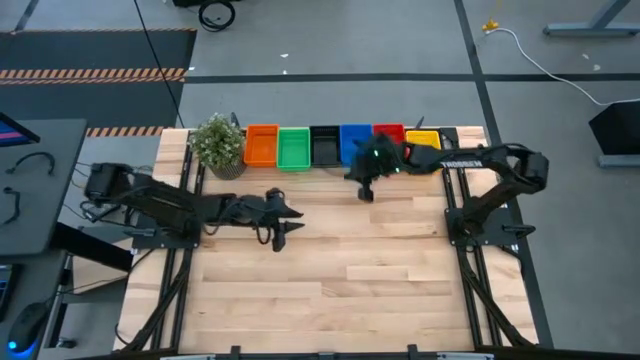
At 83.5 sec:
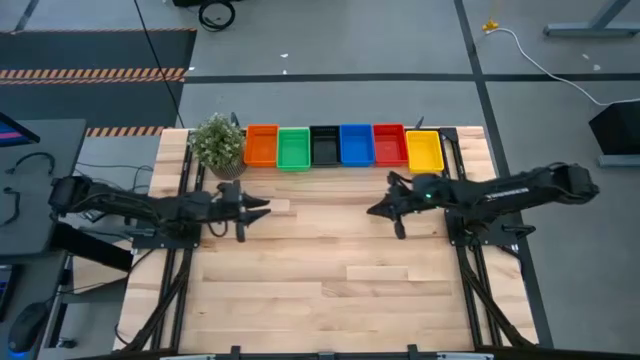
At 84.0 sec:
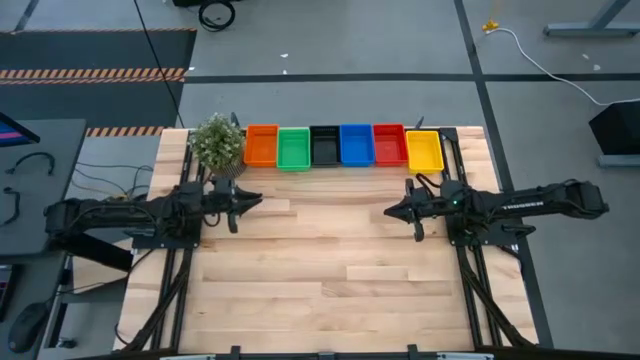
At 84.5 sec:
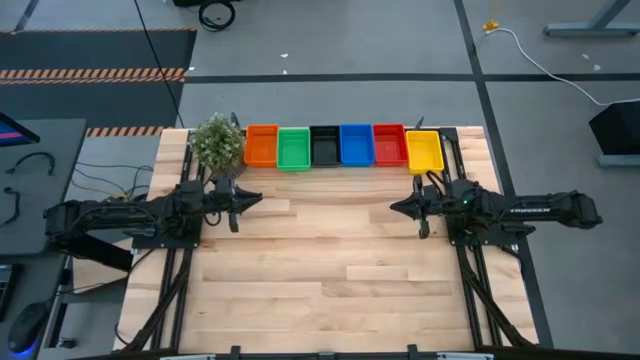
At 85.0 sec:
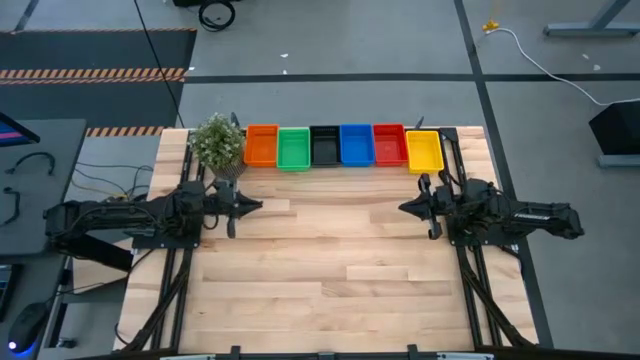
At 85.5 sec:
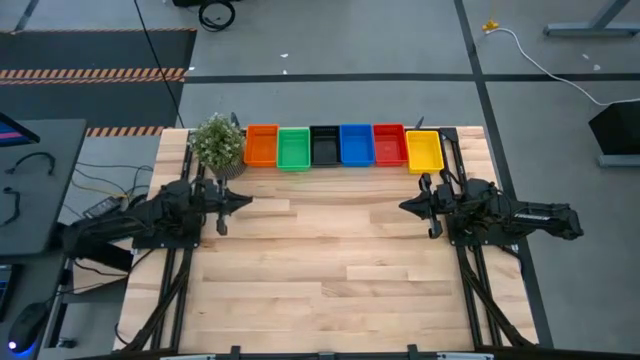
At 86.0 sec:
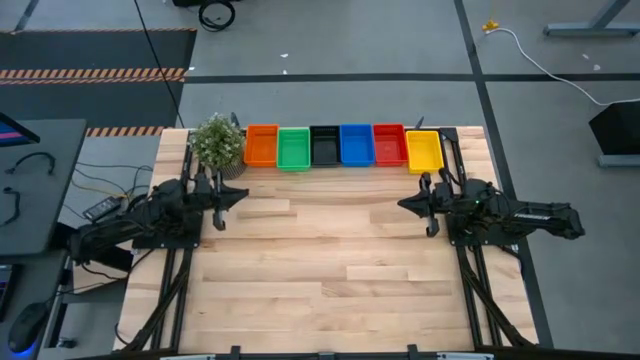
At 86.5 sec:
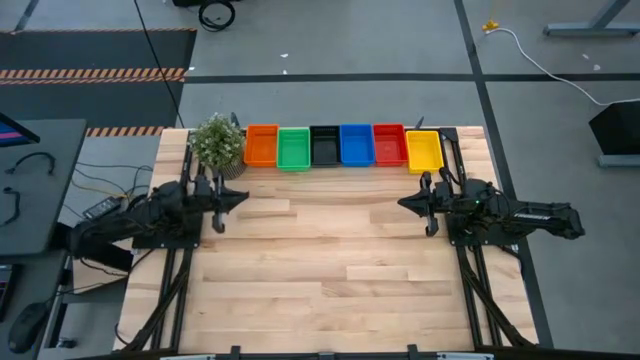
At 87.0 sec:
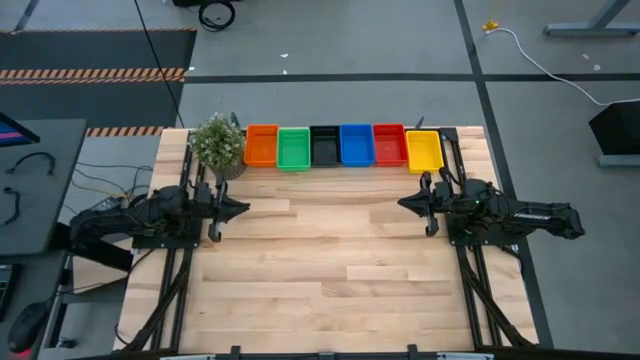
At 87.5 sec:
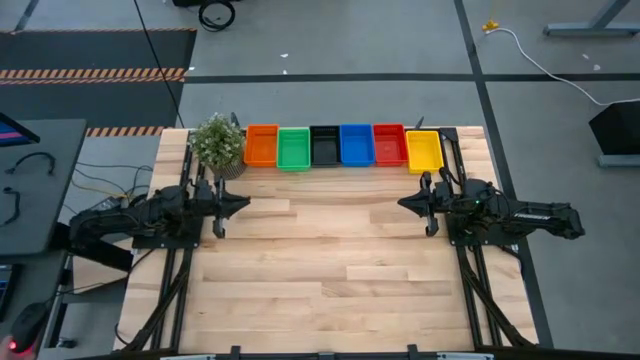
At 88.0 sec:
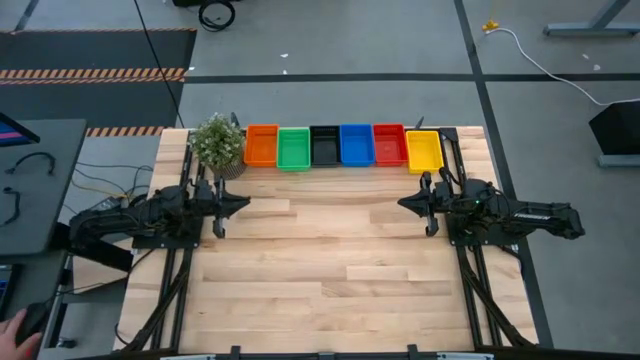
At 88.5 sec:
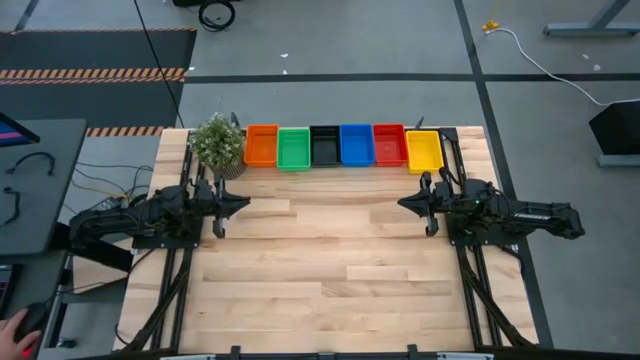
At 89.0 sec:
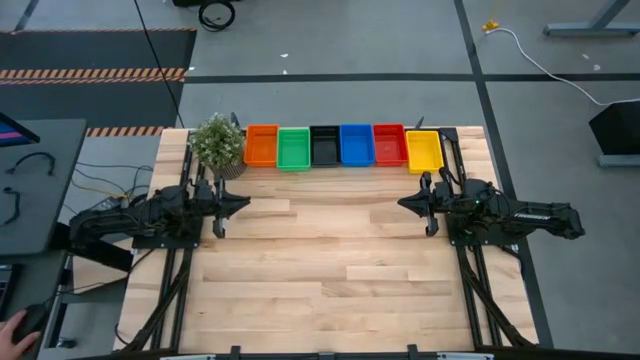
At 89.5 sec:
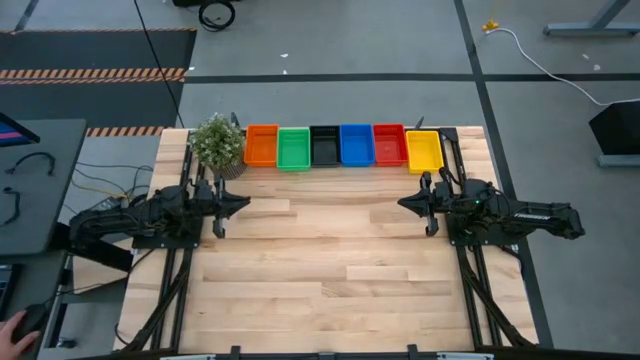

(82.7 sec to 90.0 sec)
Return to Home Position

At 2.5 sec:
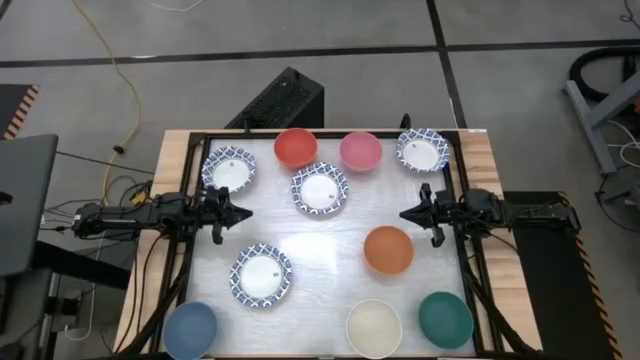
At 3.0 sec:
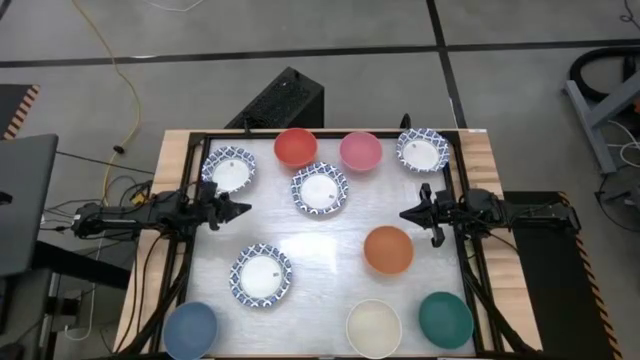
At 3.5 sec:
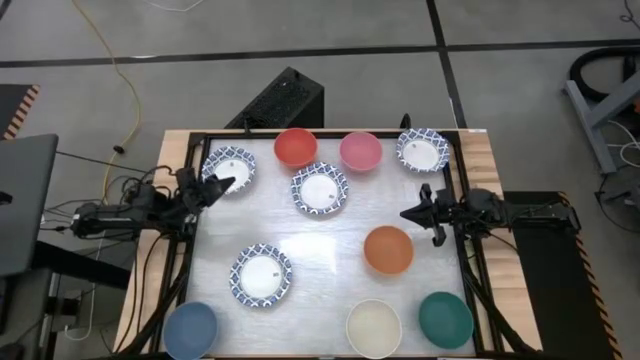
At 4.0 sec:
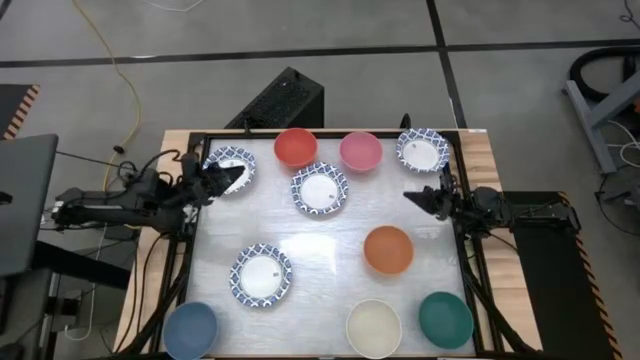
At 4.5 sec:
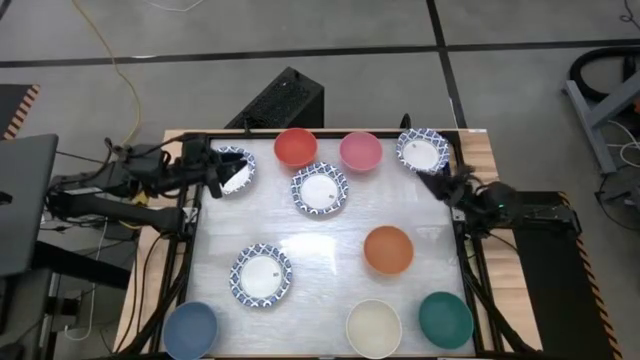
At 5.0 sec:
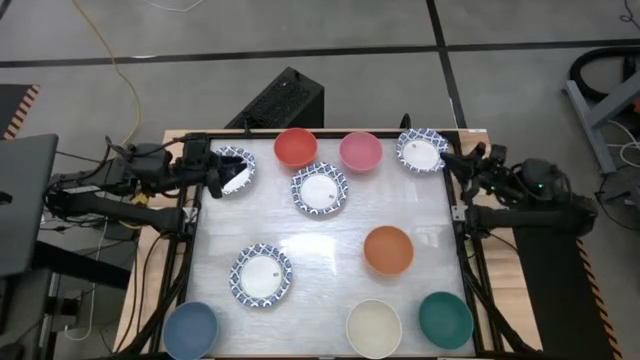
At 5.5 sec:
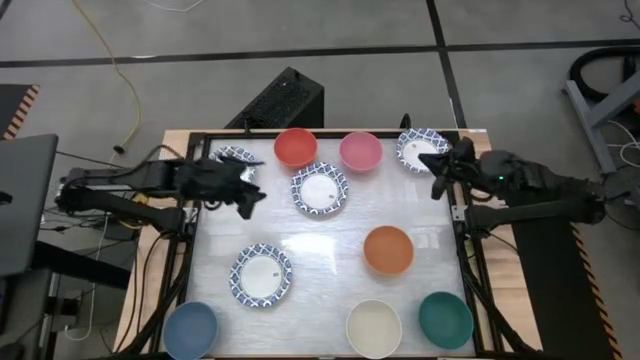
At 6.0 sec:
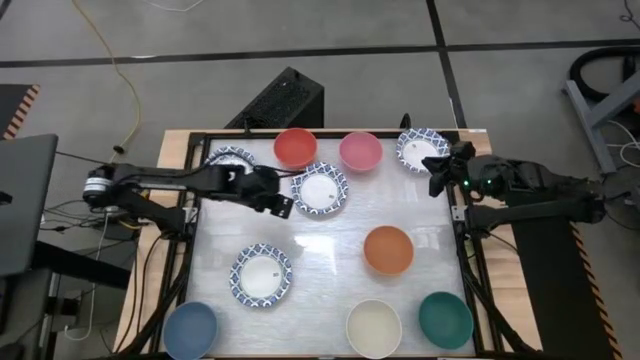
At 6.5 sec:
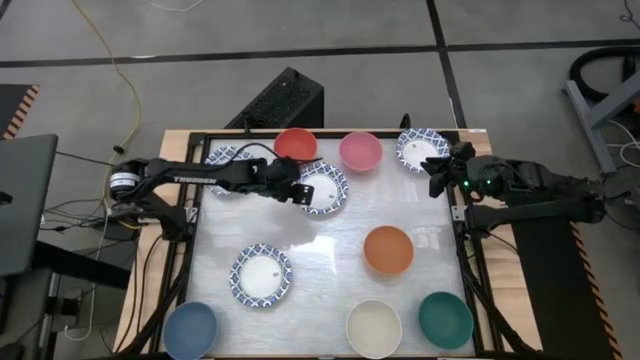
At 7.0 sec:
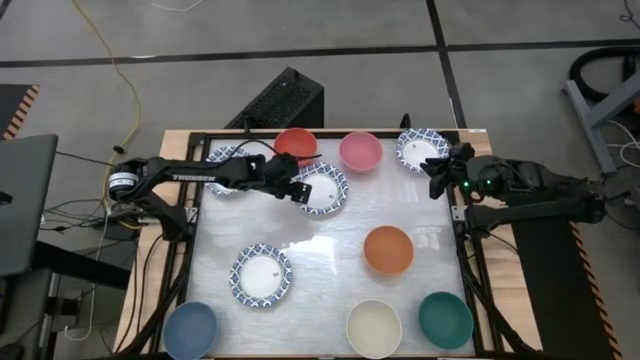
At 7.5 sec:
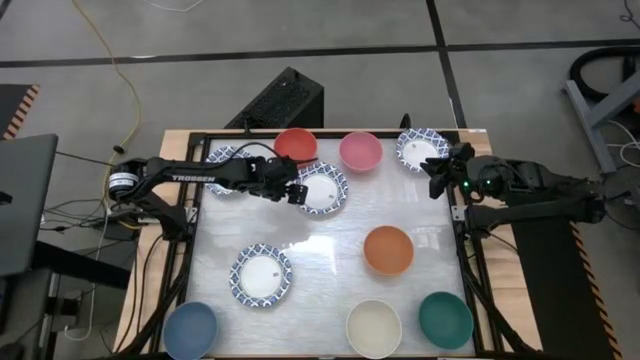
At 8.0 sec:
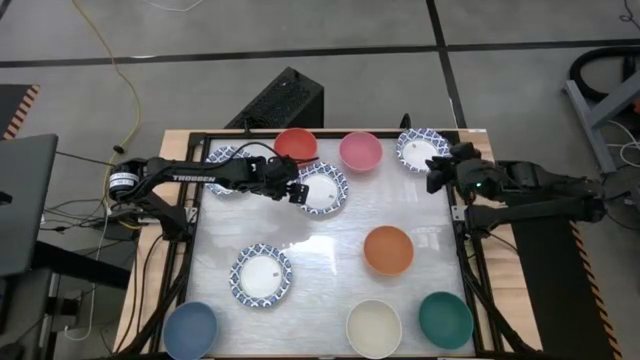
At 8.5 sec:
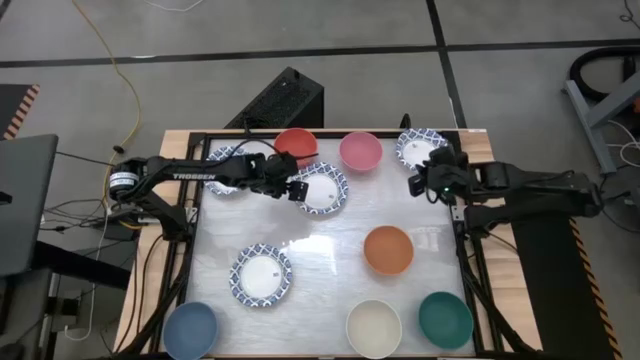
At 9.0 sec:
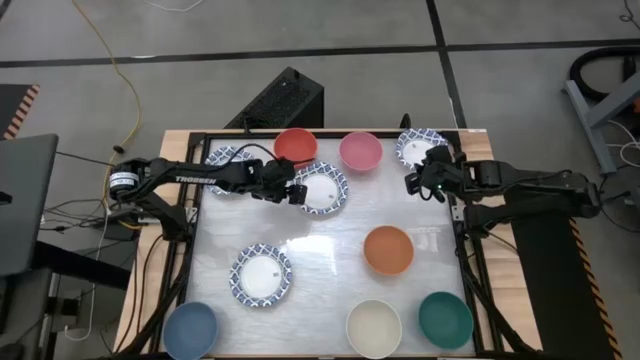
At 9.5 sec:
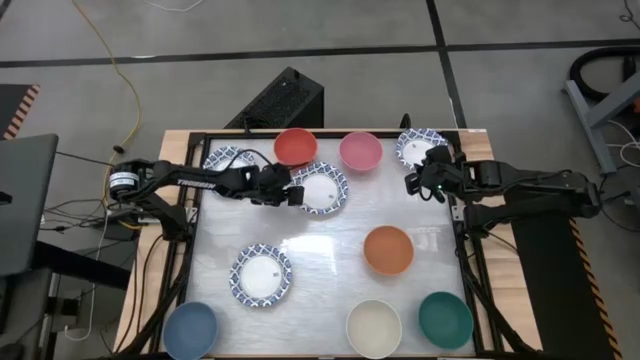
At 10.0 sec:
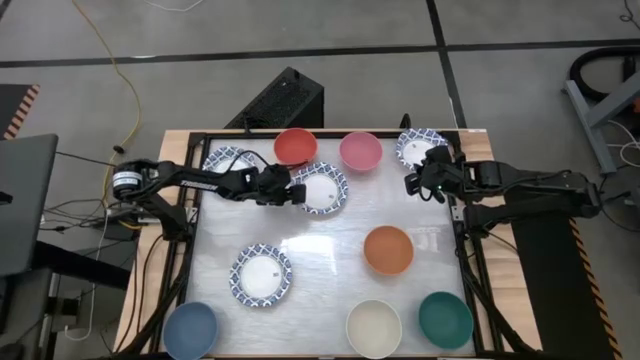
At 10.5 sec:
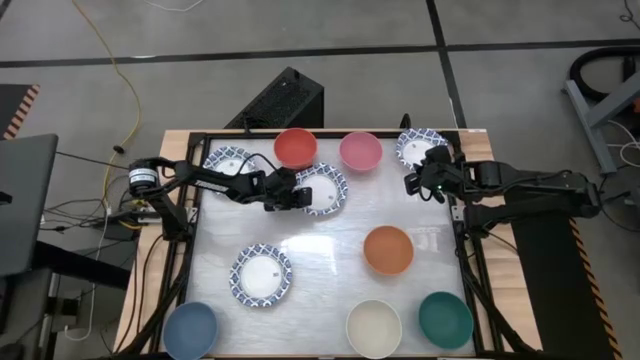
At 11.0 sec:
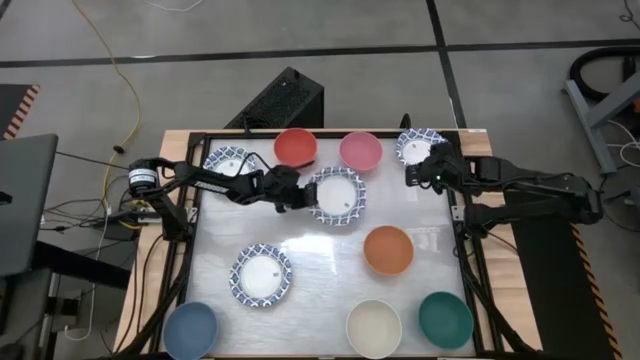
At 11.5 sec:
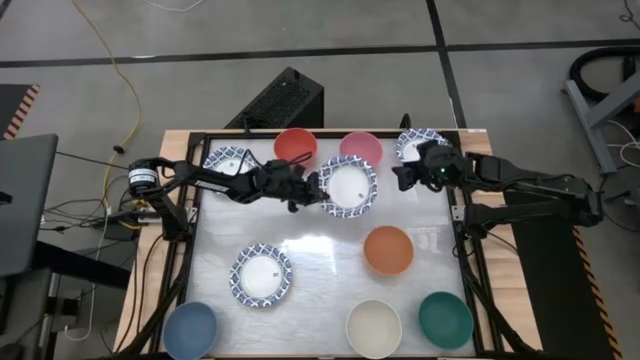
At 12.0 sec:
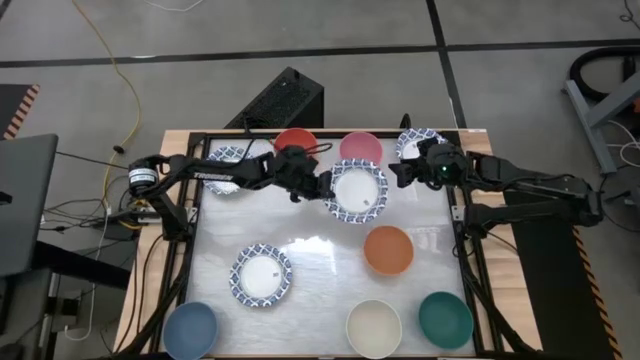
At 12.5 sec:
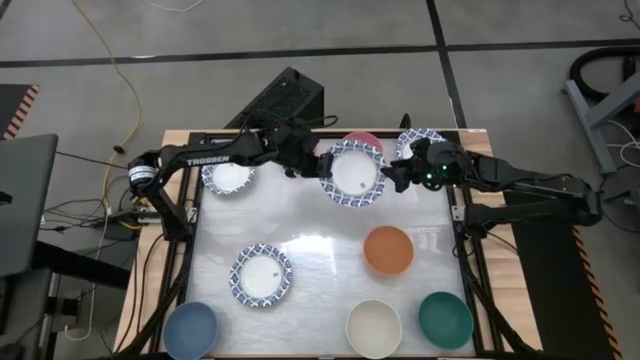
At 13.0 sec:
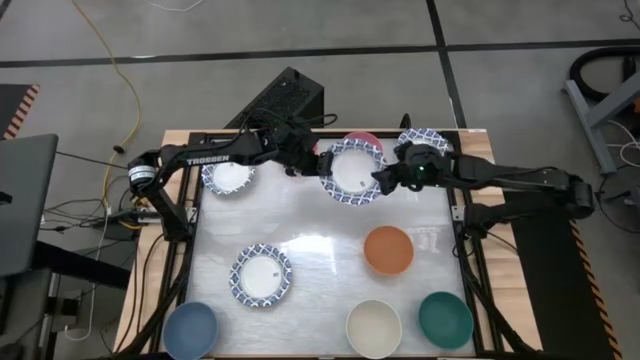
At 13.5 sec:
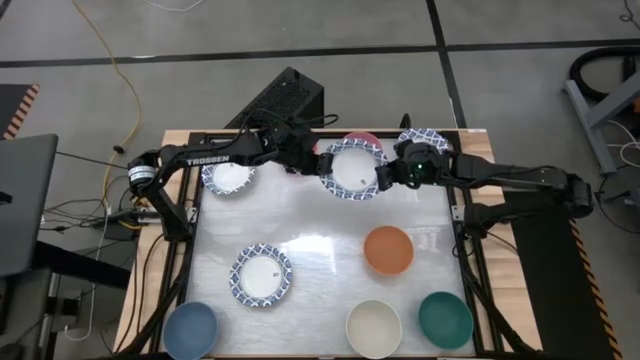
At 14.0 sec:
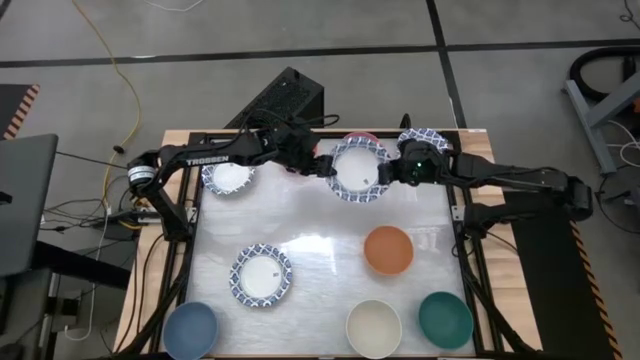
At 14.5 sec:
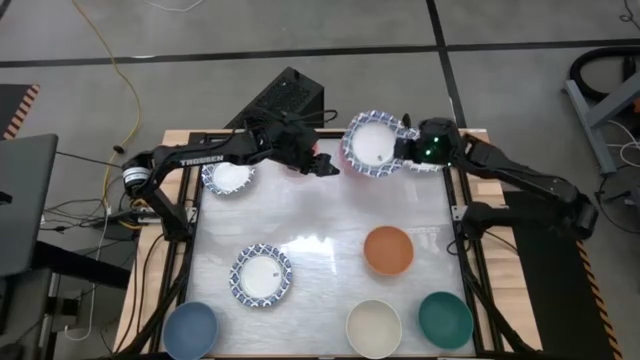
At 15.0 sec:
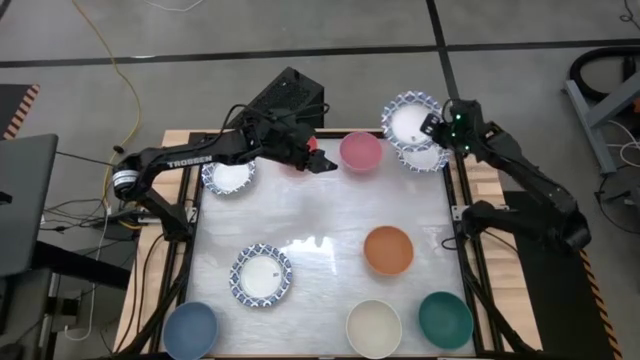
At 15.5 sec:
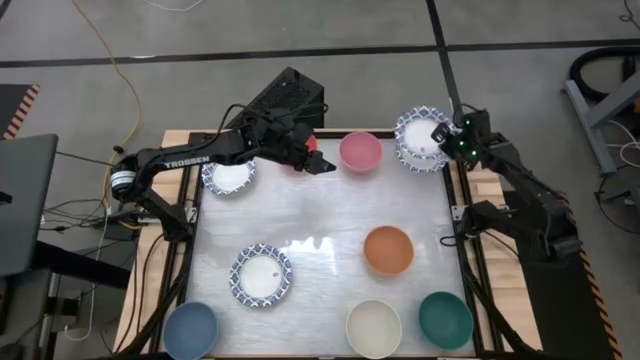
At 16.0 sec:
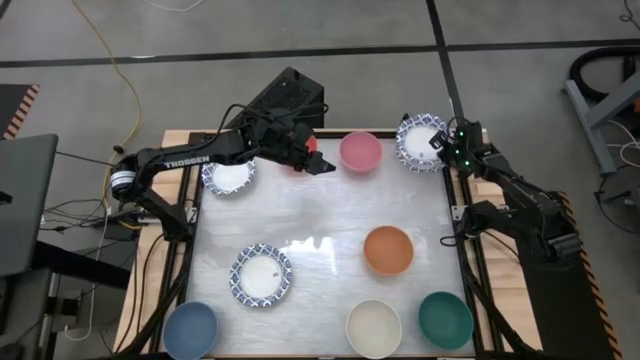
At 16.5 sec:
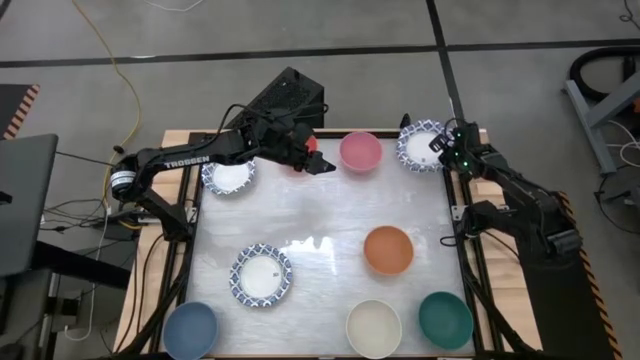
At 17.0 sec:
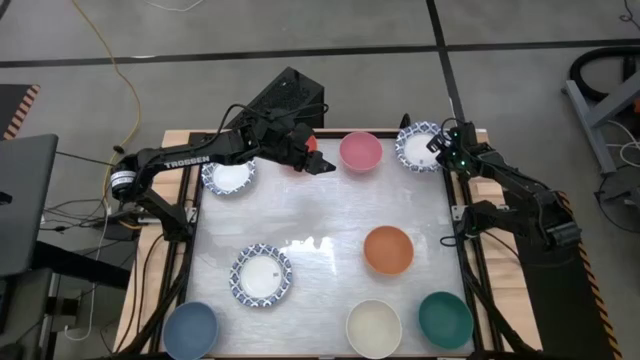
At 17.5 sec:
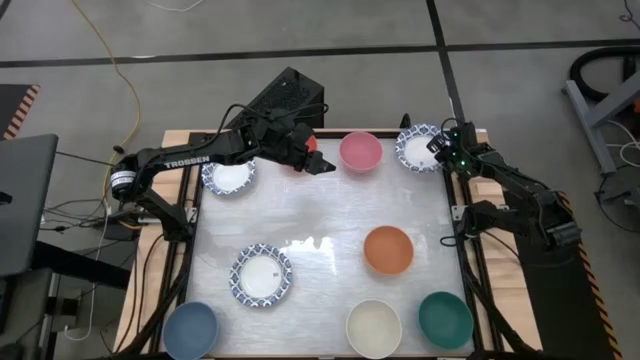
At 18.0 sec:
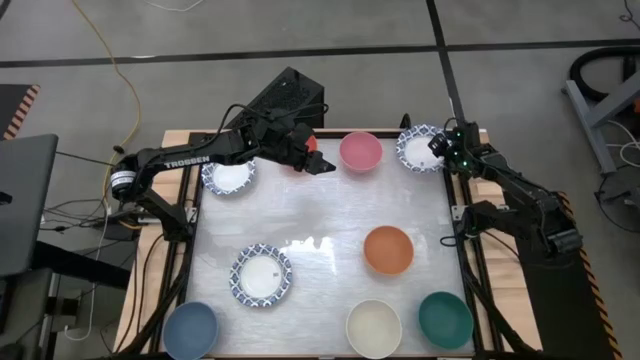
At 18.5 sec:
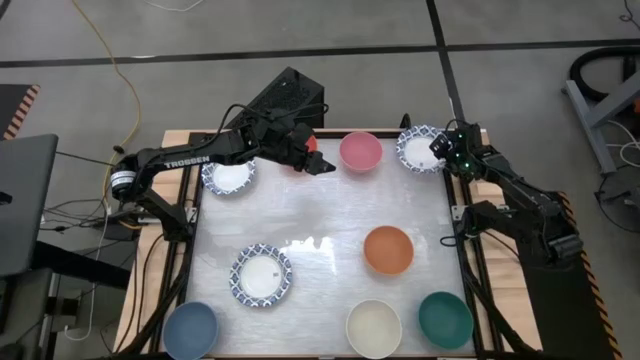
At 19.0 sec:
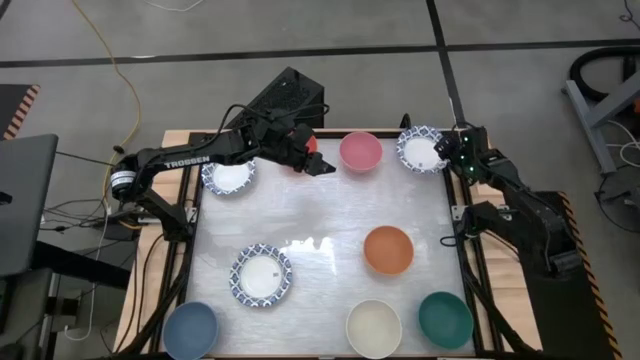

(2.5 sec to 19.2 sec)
Stack the blue patterned bowl on top of the blue patterned bowl
